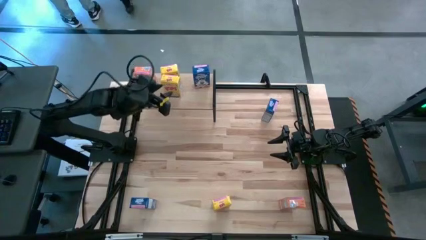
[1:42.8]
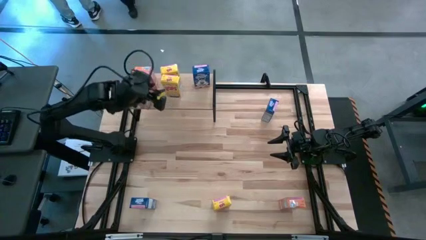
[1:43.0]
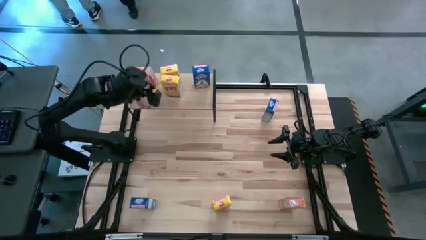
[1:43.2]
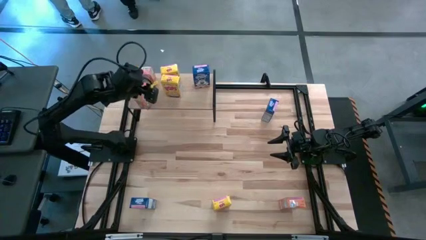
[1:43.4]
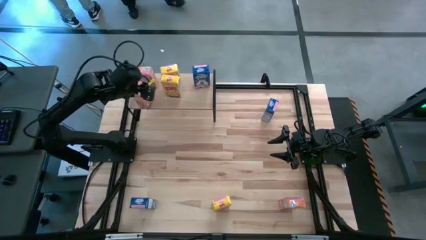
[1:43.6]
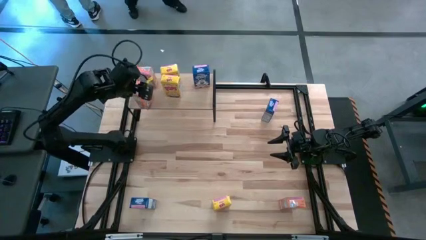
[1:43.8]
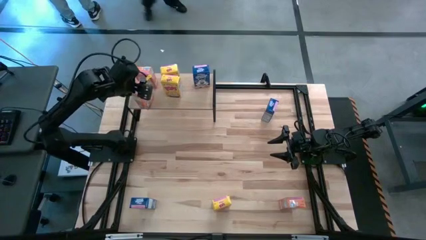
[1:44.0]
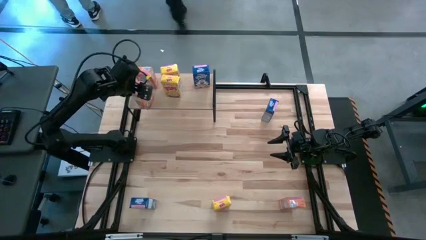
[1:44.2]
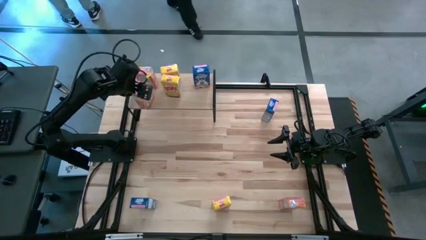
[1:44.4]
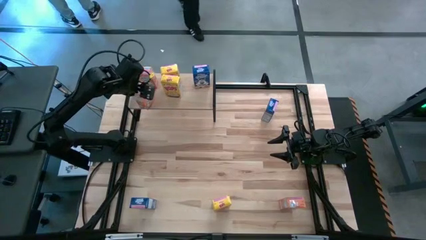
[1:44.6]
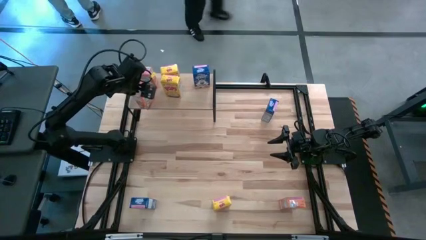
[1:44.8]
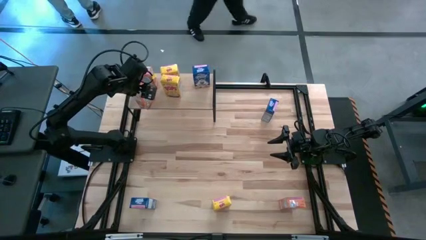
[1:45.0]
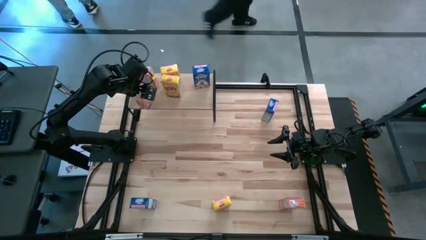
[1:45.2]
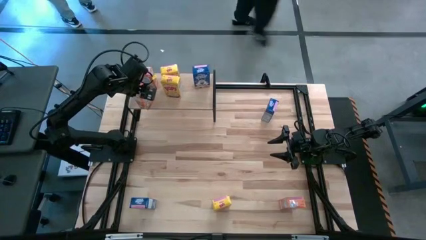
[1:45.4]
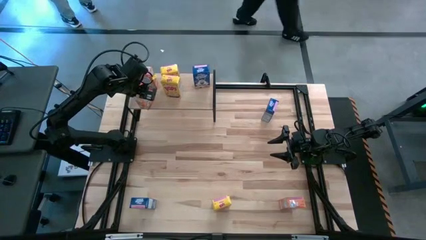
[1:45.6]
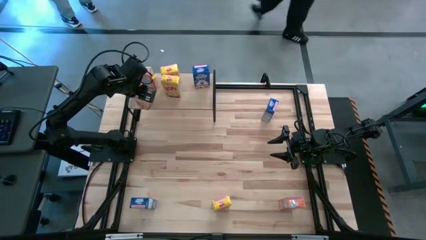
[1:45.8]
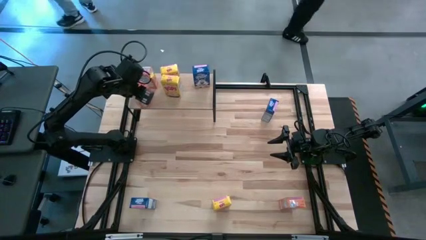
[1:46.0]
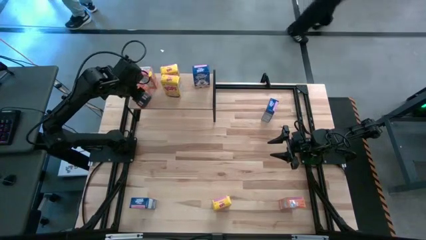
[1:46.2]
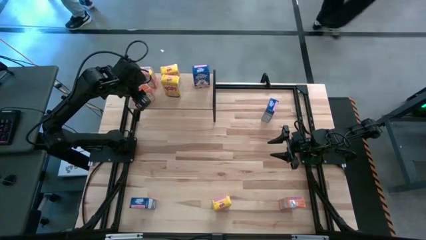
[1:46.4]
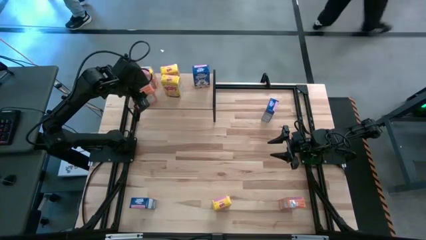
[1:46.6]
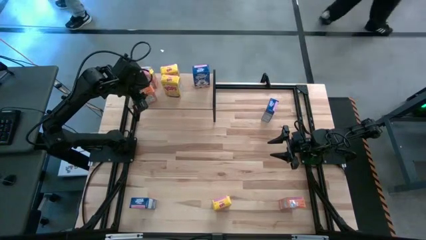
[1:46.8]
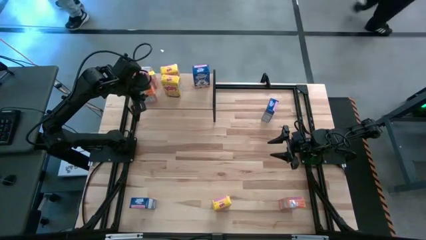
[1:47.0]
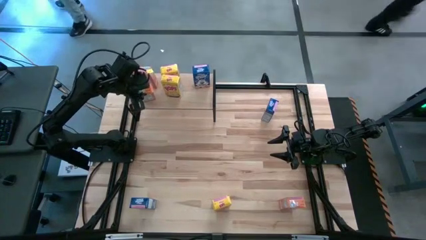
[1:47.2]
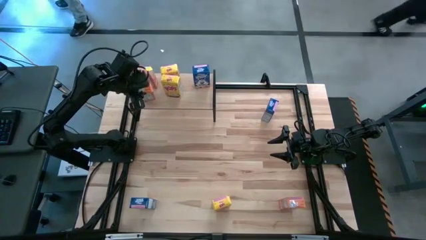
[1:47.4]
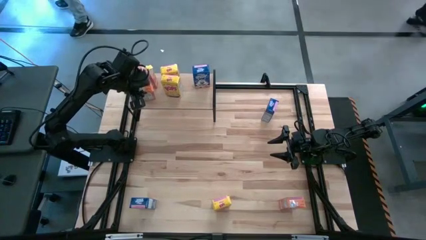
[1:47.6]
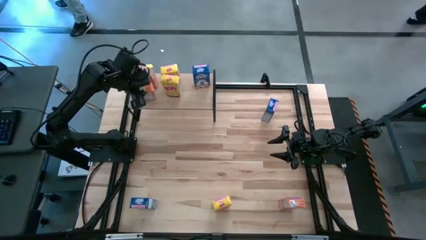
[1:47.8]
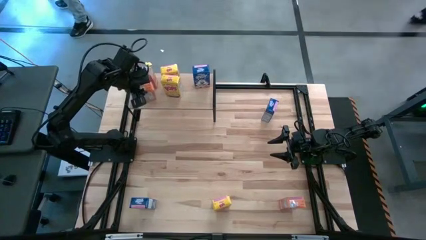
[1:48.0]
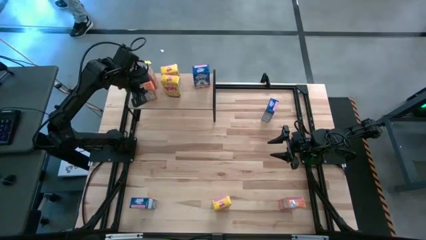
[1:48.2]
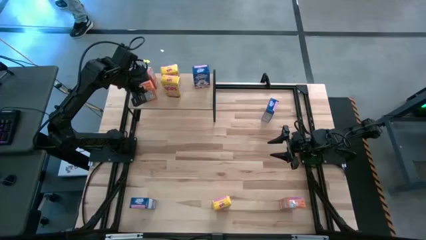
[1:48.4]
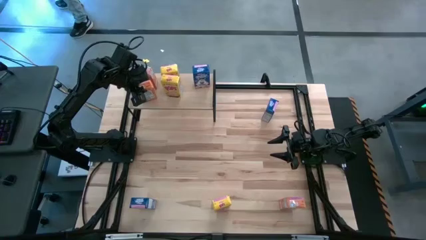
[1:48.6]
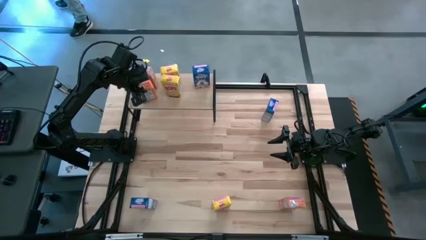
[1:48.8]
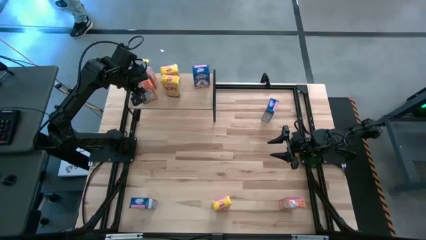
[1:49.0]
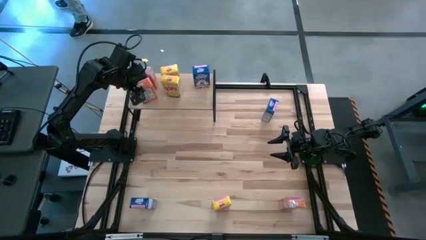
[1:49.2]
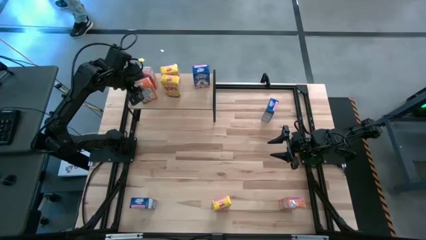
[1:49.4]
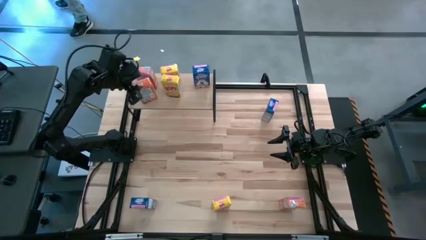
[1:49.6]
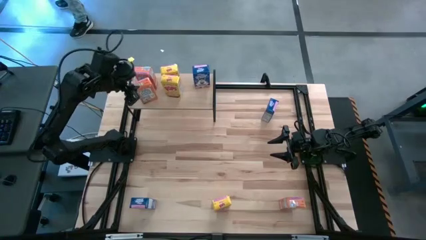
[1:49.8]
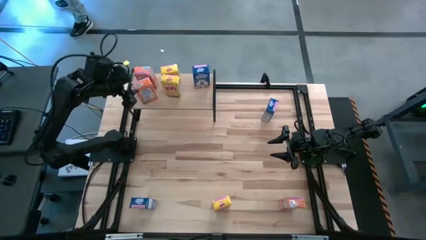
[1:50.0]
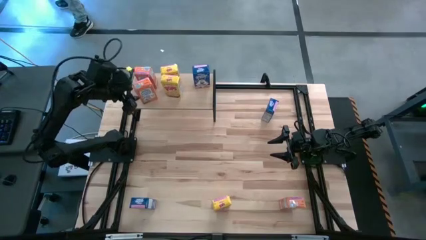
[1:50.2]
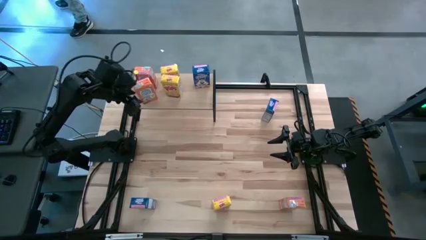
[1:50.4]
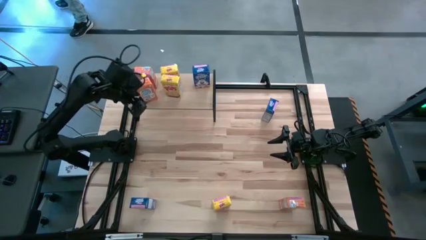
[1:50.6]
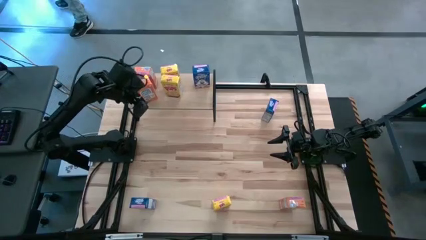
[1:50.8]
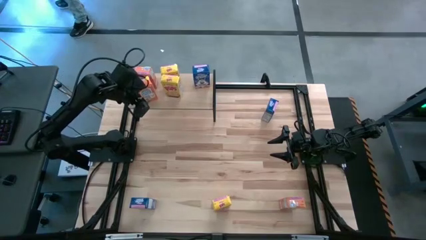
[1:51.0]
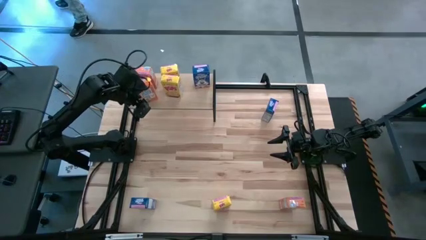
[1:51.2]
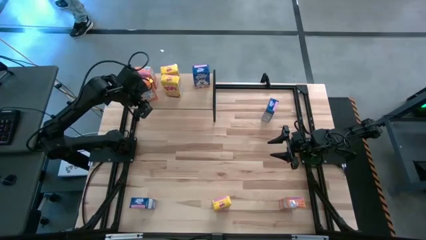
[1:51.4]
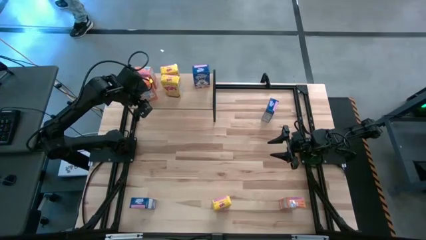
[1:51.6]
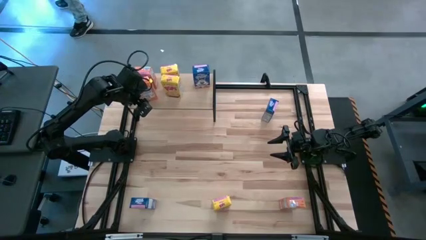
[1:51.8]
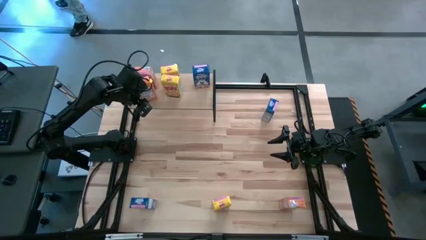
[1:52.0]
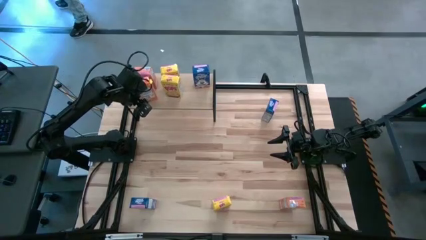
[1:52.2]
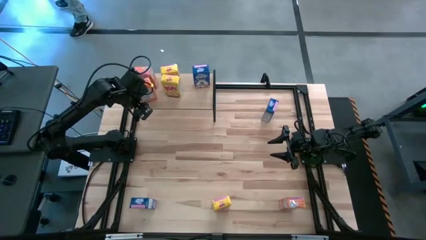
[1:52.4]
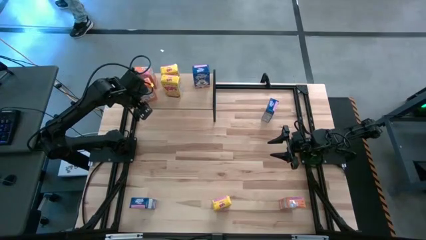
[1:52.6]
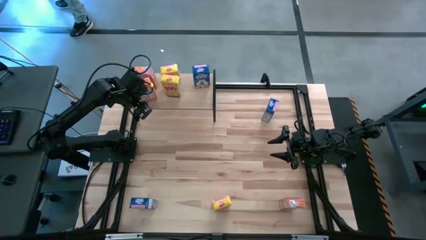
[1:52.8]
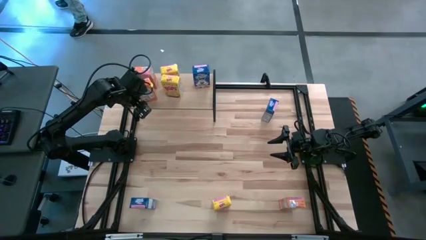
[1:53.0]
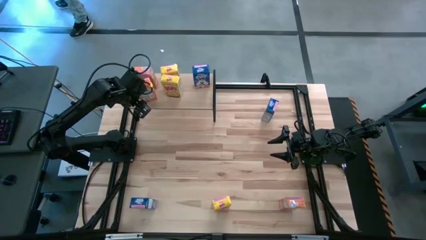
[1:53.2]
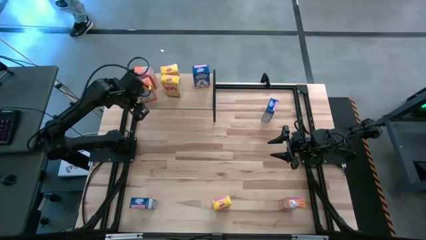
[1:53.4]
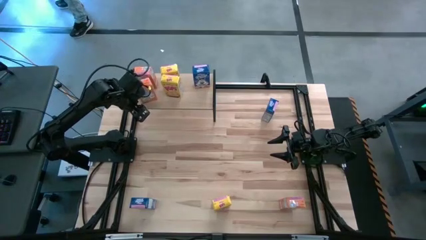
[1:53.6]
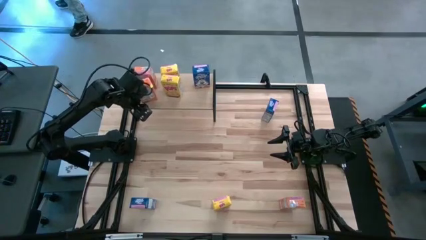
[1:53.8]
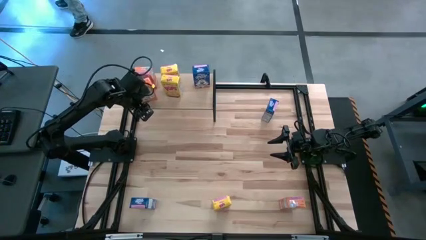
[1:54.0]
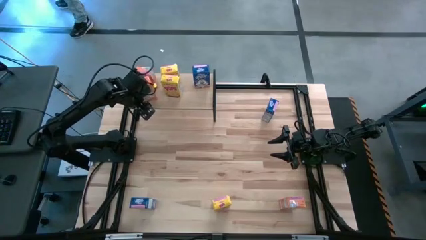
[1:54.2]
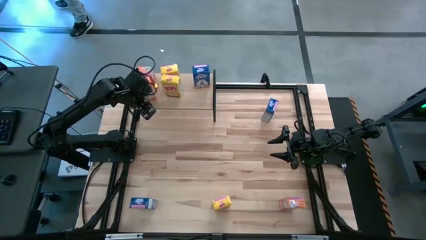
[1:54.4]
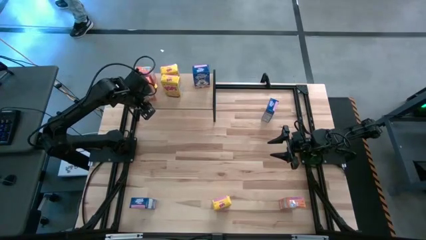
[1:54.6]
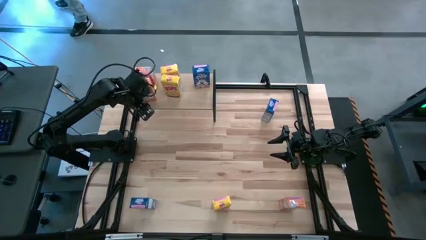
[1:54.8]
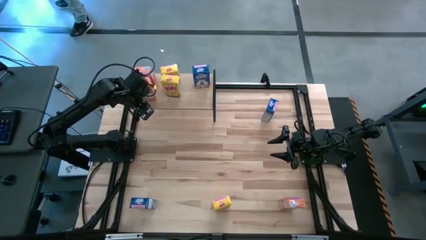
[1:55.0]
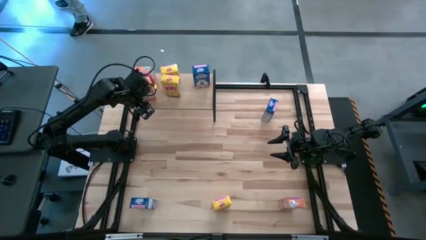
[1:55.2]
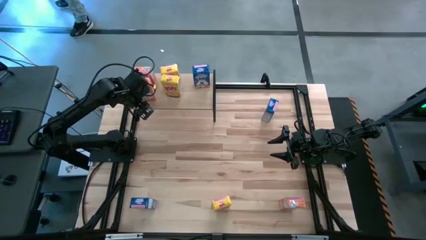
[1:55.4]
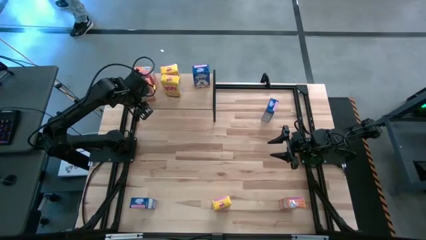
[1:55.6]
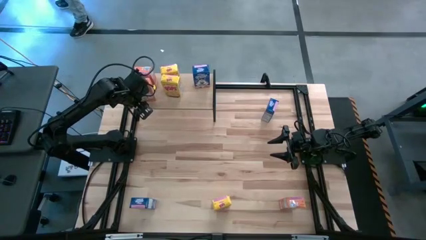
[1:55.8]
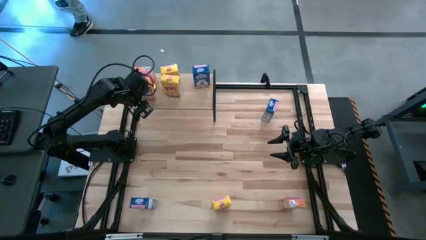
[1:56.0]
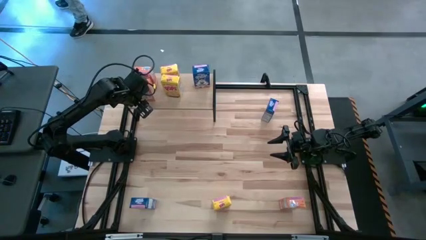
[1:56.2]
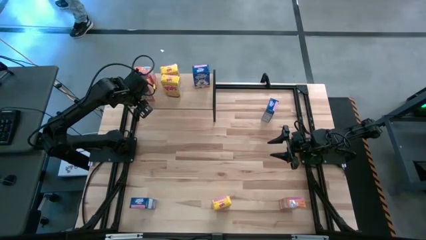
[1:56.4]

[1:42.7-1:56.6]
Task: Stack cereal on shelf
Put the top orange cereal box on the shelf aligned with the other orange cereal box

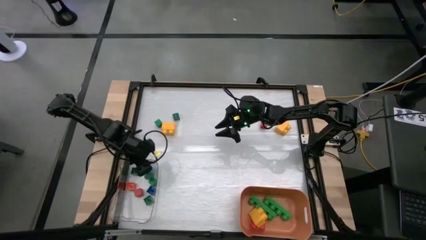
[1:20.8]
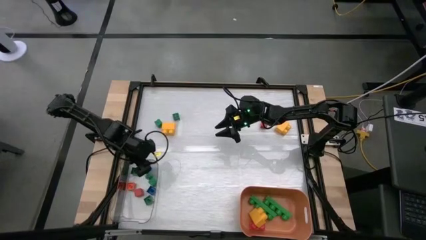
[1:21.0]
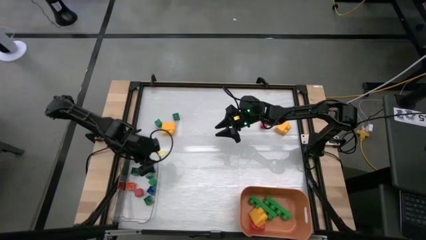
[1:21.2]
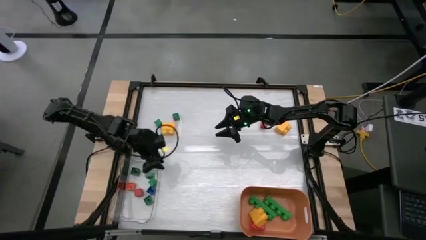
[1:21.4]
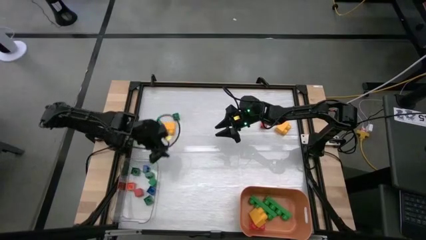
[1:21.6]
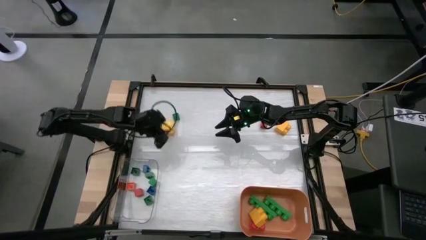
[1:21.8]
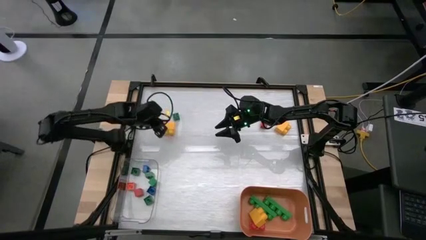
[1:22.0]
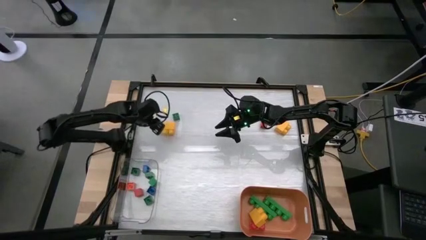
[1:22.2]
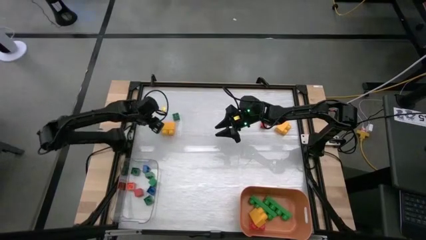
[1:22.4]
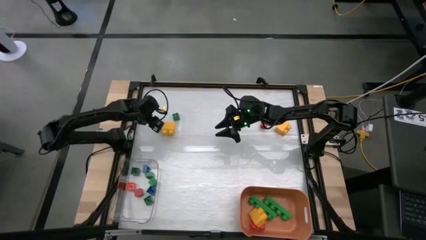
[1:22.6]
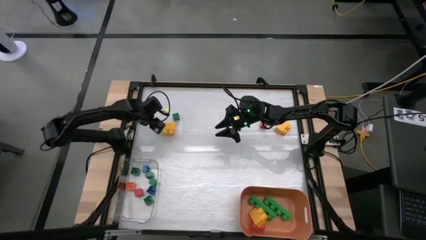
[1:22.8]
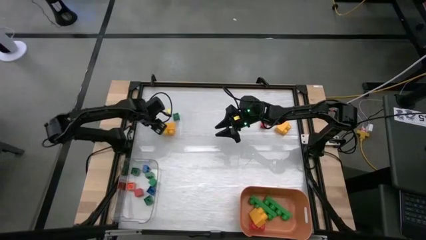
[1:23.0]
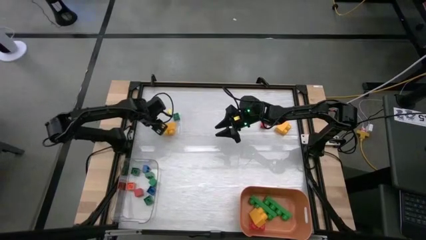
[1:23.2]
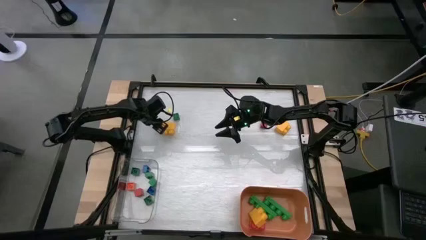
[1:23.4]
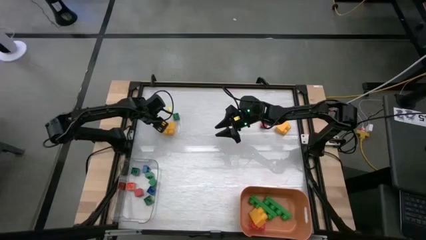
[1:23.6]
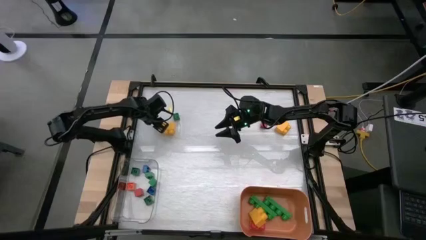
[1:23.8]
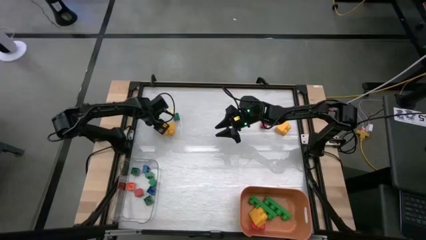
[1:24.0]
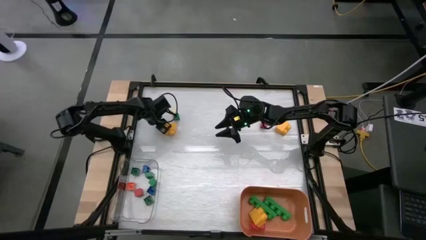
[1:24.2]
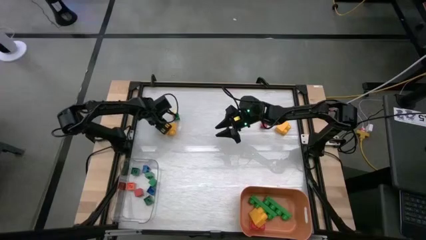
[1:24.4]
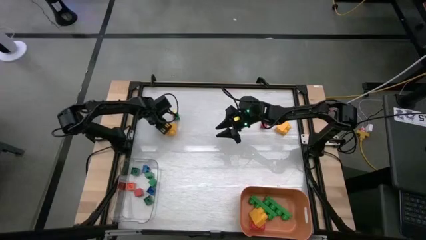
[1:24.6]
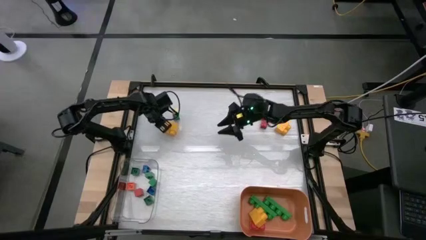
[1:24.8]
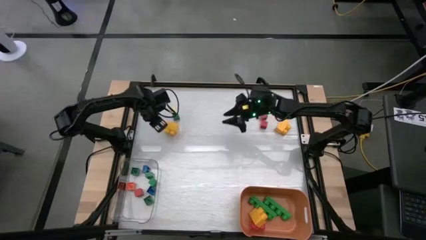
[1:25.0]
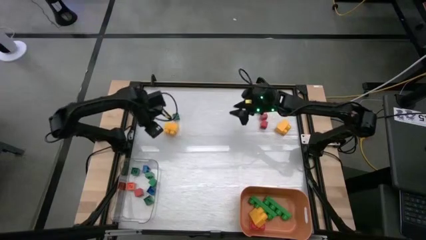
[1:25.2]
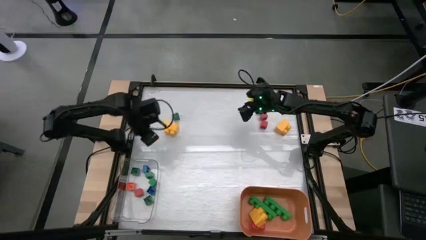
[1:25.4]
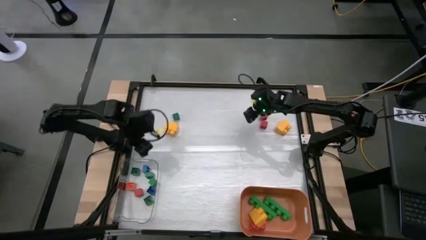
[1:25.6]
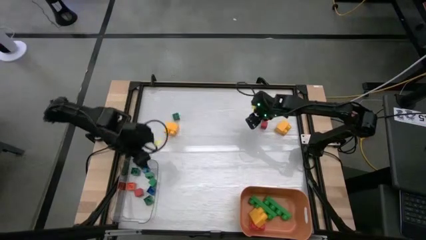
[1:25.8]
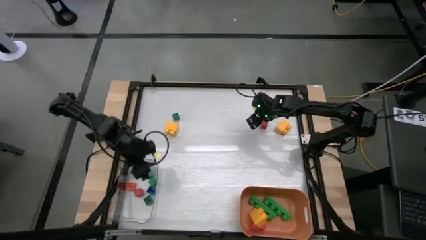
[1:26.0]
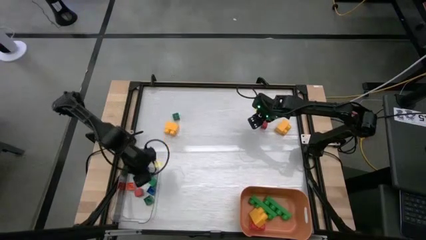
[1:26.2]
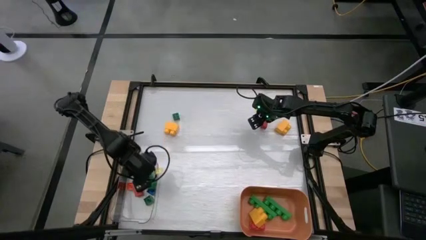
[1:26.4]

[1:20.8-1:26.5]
Task: Sort blocks by size
Put the small green block into the transparent bin
